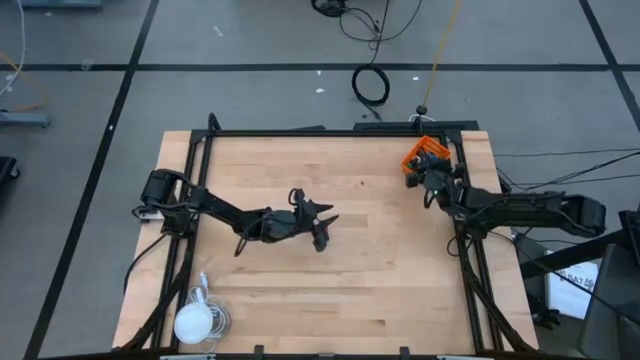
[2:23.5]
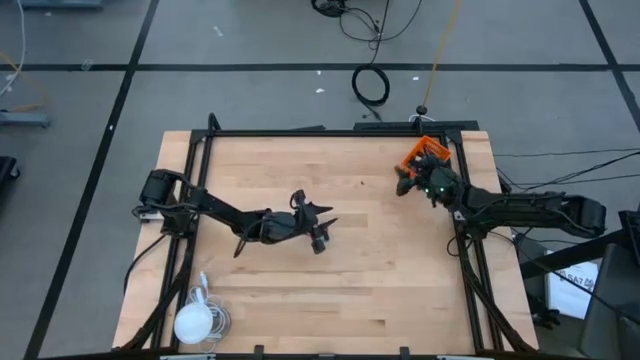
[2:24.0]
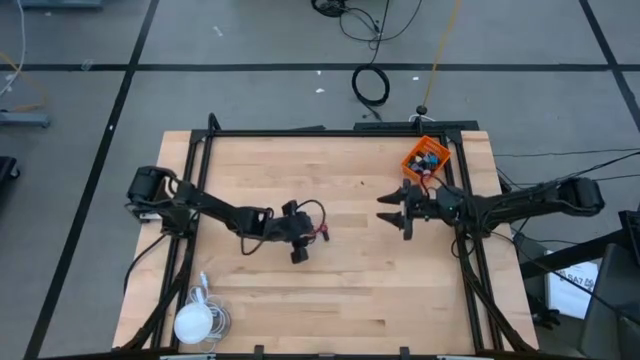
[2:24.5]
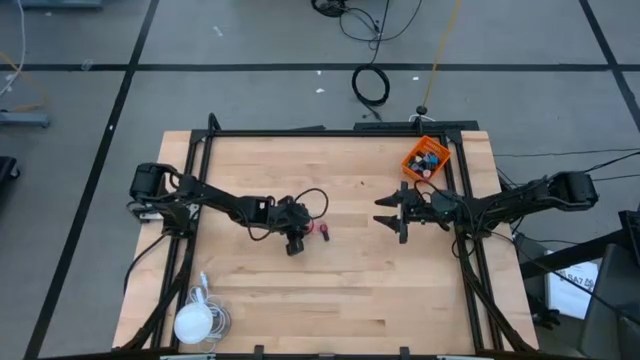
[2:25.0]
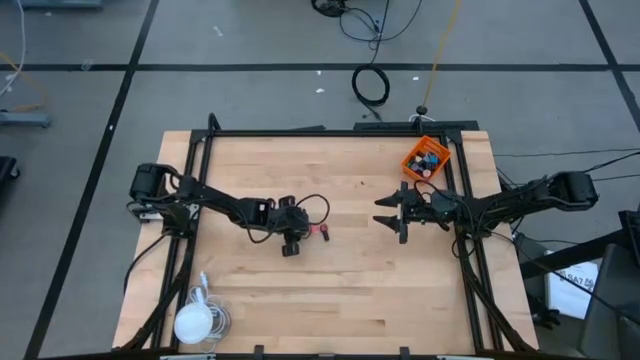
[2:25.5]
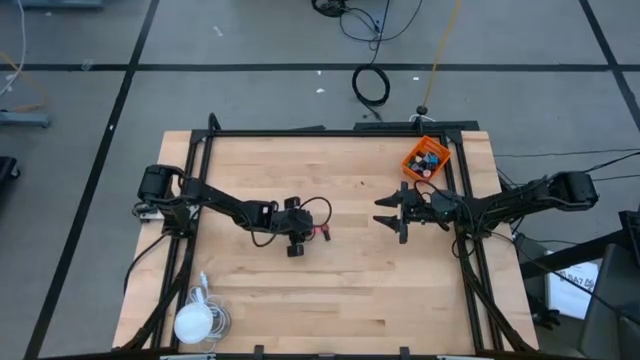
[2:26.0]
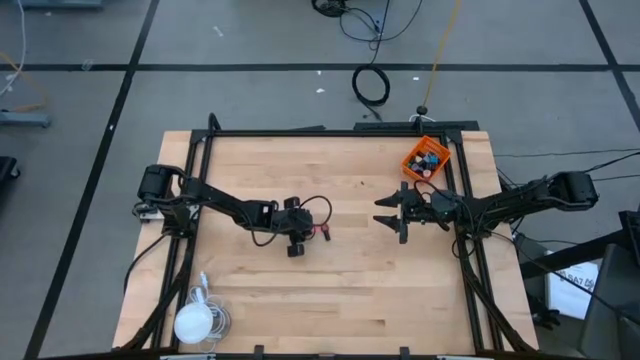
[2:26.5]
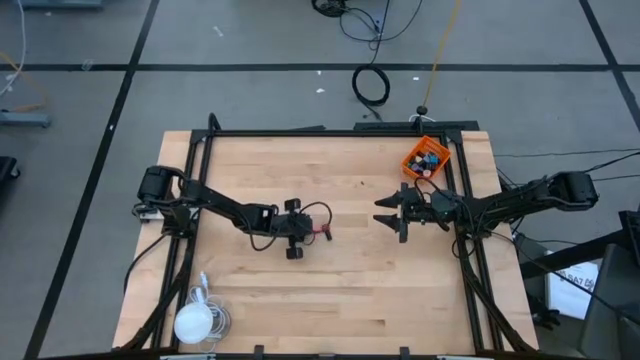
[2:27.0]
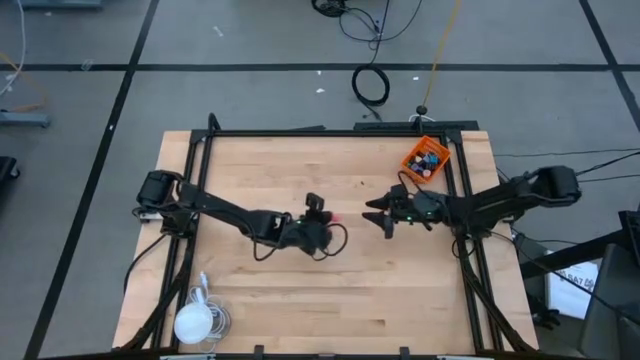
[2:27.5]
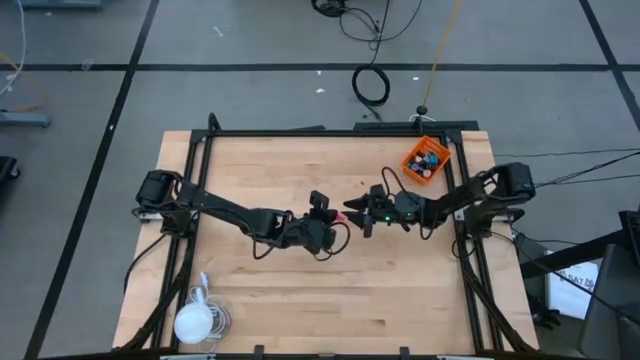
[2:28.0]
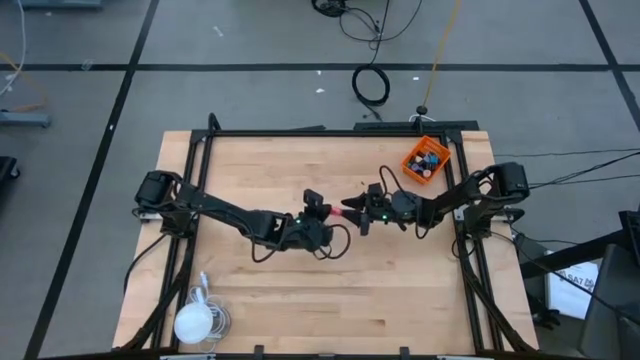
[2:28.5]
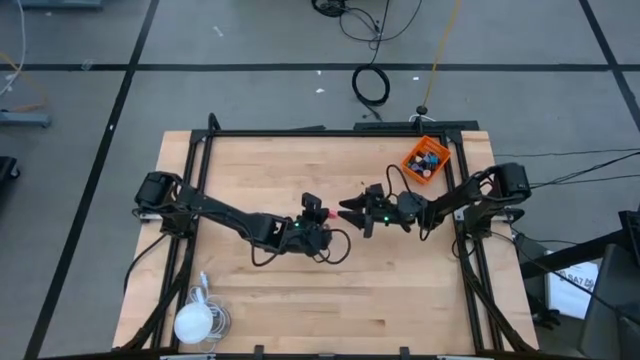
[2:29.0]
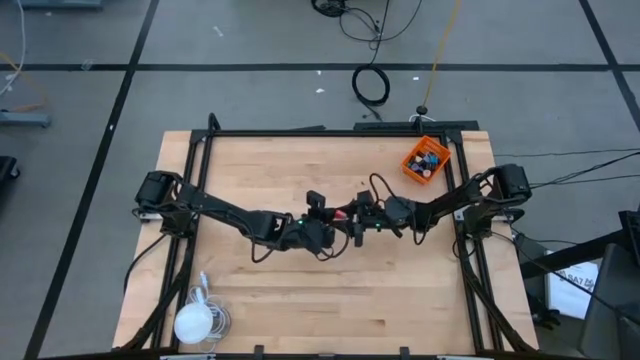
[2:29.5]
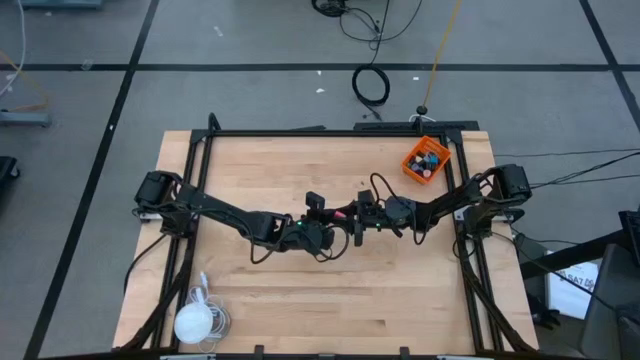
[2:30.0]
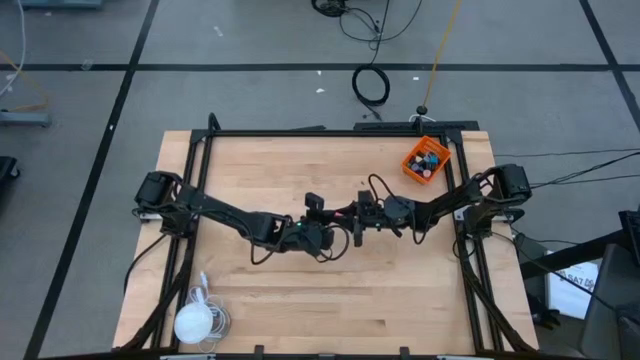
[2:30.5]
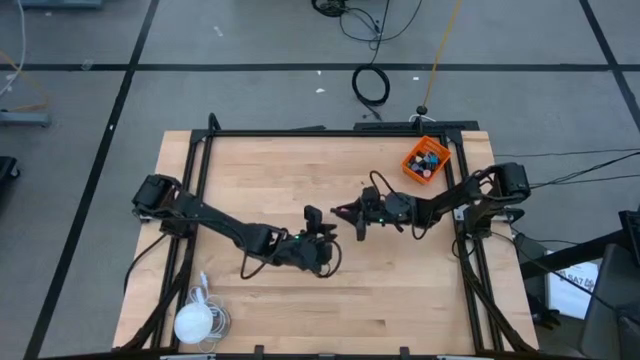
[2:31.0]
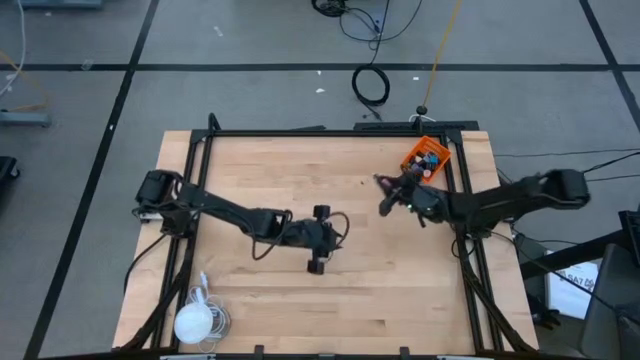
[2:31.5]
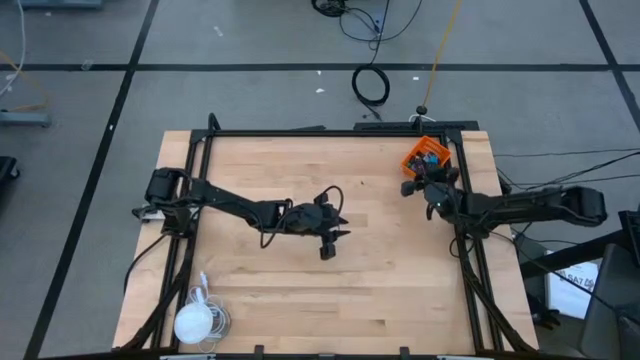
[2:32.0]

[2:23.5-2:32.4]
Task: Pick & Place Nail Polish
Put the pink nail polish bottle into the orange basket

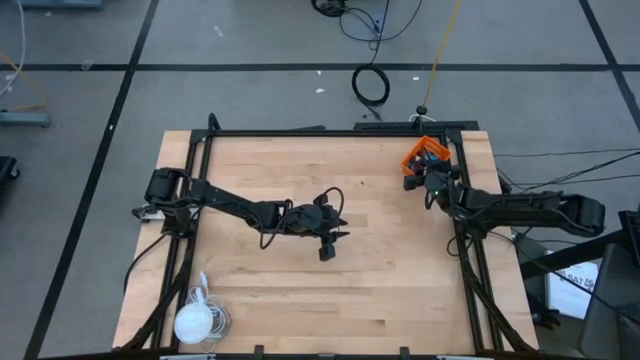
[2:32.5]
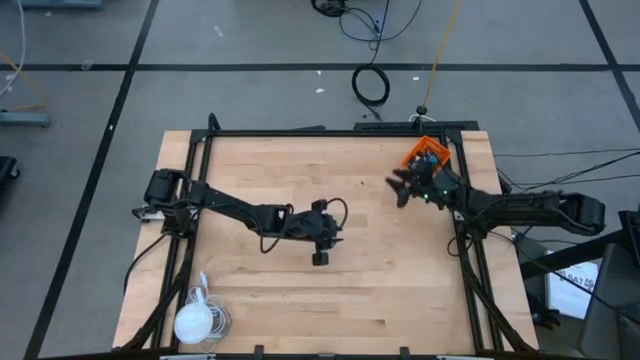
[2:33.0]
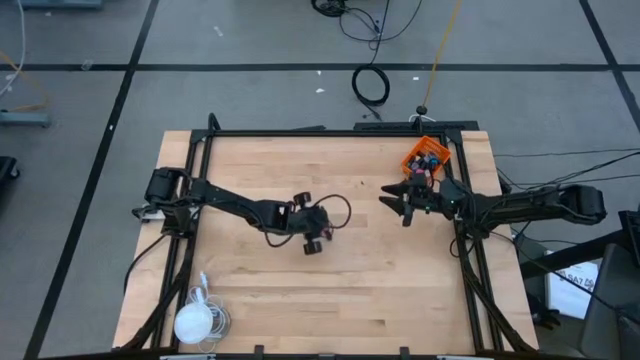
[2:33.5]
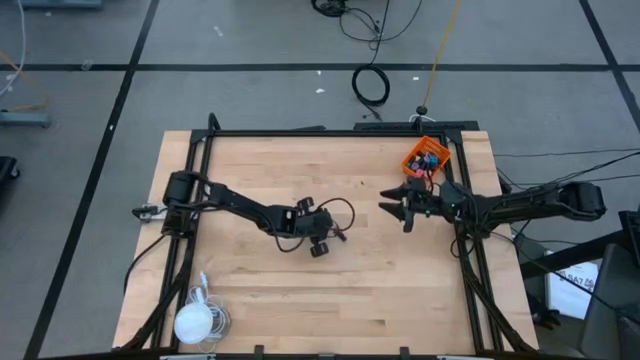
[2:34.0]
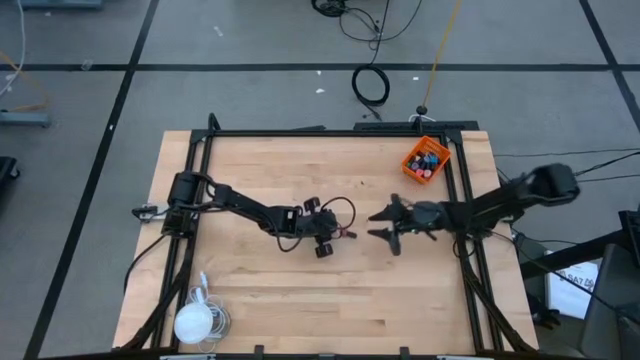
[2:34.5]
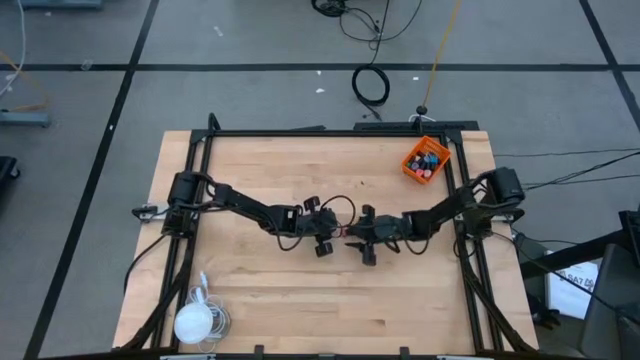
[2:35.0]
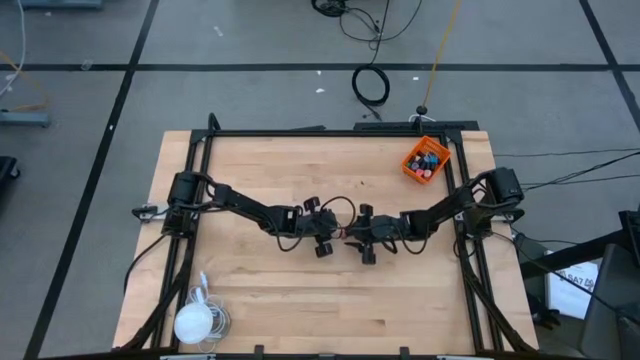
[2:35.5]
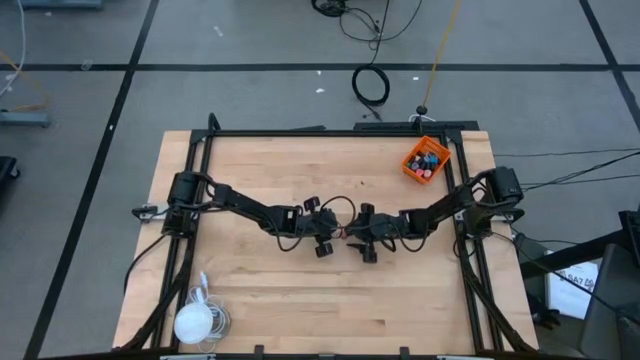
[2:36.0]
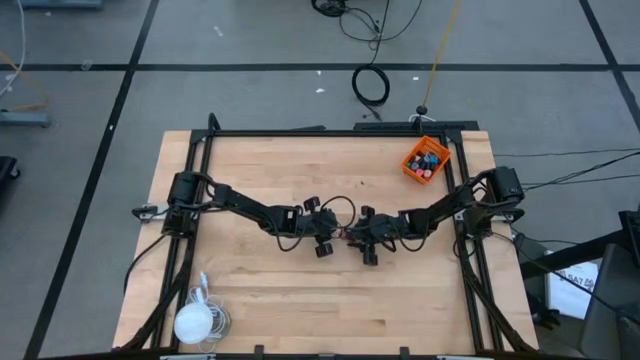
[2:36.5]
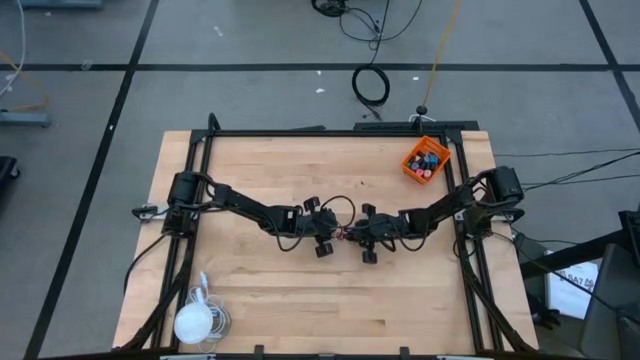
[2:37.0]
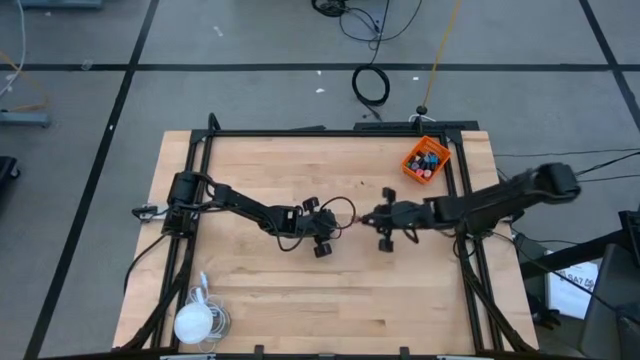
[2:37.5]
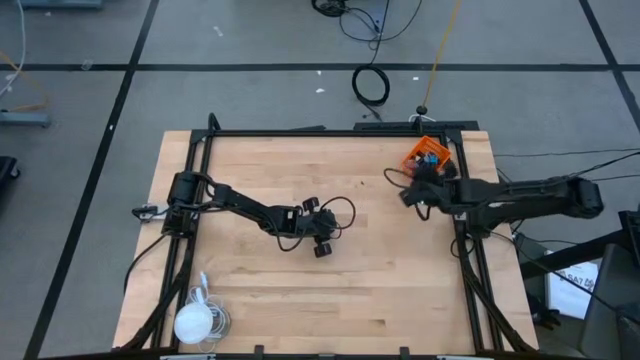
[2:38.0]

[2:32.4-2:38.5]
Put the red nail polish bottle into the orange basket

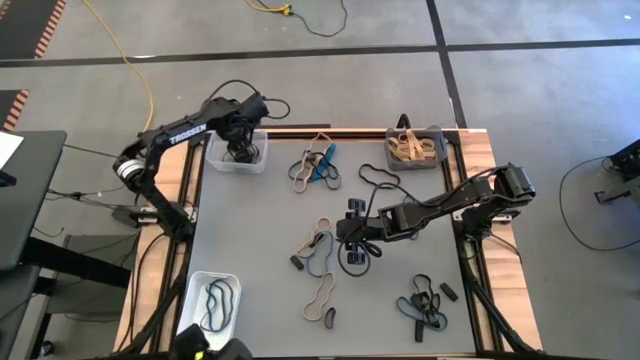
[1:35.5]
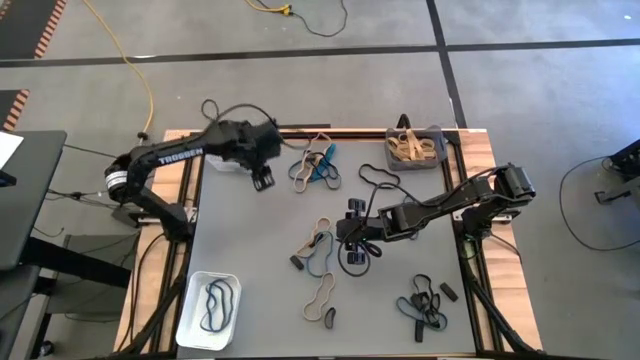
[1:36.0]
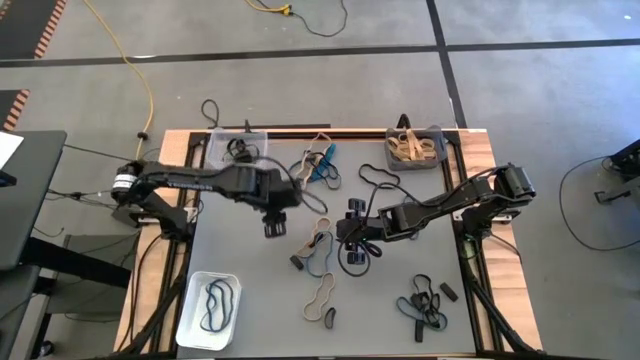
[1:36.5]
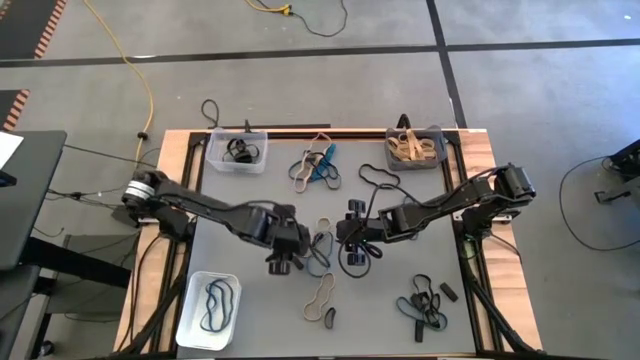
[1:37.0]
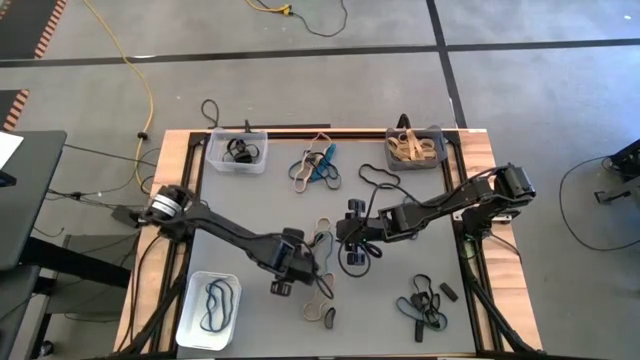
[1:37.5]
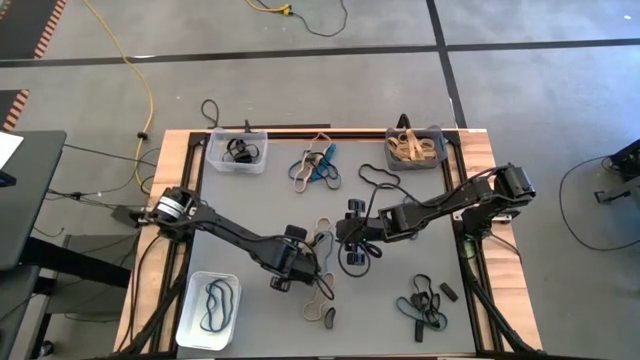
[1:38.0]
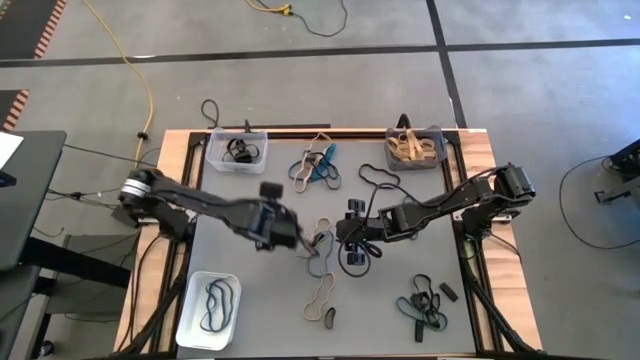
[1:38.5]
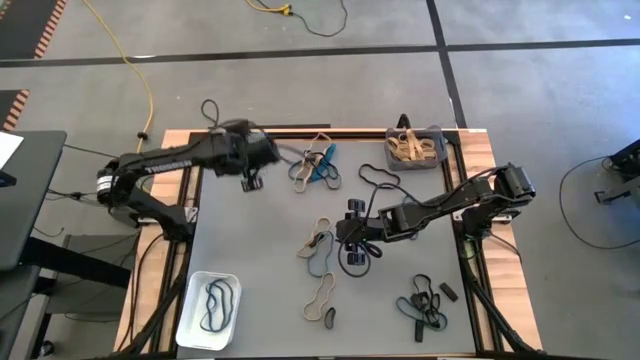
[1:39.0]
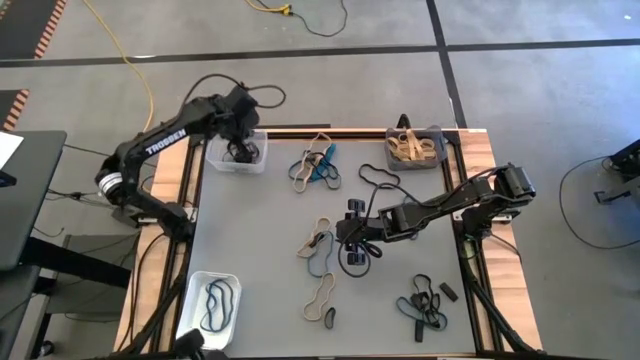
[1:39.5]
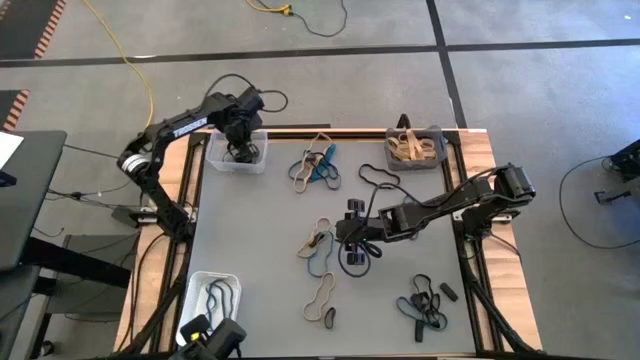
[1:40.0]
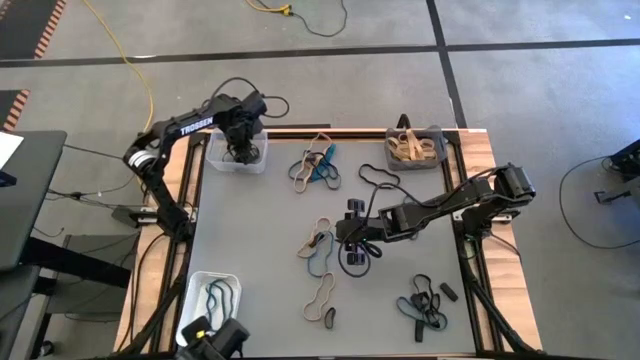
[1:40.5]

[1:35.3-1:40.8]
Task: Sort rubber bands into baskets
Put the black rubber band into the transparent bin
